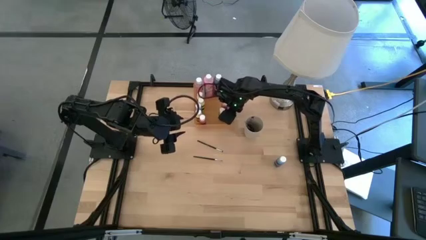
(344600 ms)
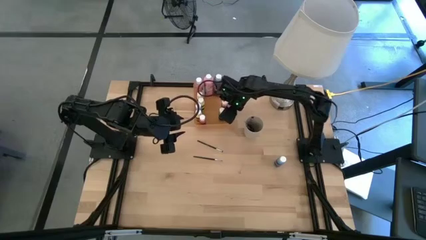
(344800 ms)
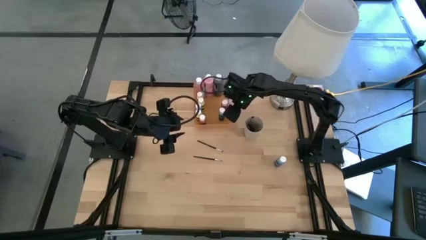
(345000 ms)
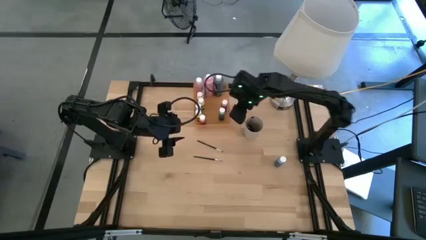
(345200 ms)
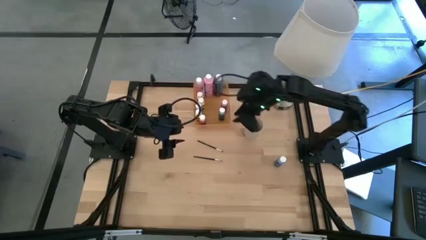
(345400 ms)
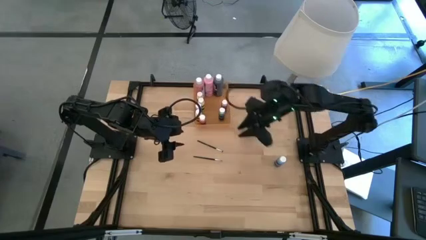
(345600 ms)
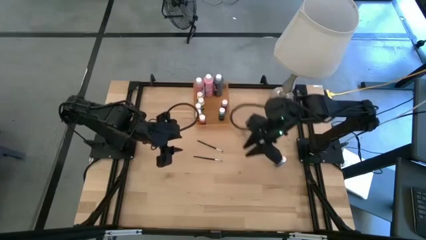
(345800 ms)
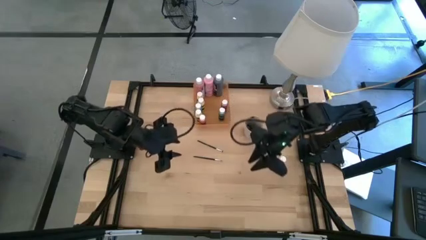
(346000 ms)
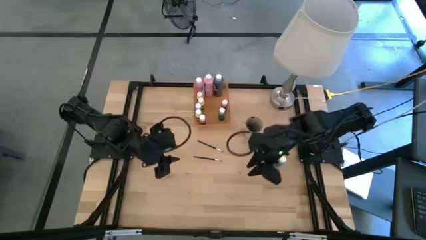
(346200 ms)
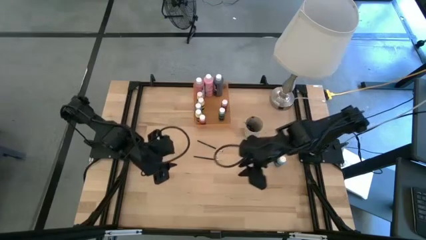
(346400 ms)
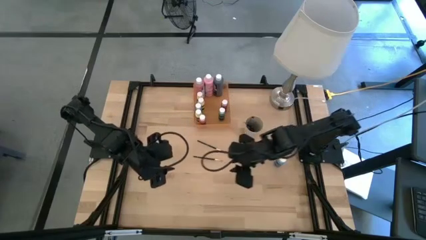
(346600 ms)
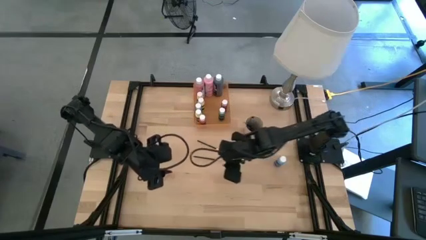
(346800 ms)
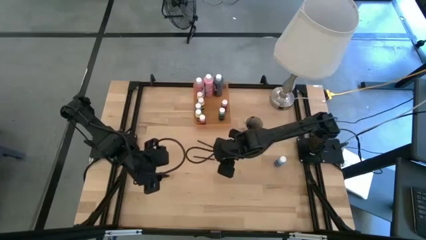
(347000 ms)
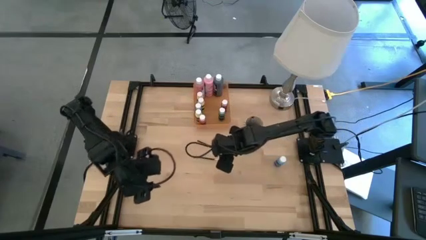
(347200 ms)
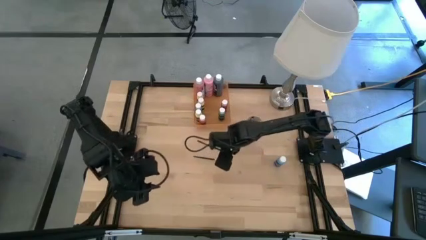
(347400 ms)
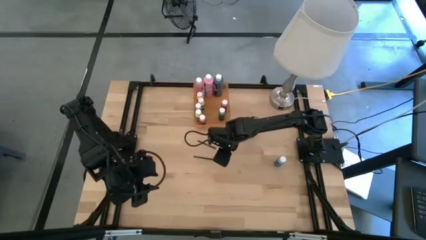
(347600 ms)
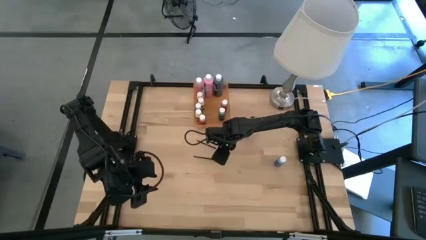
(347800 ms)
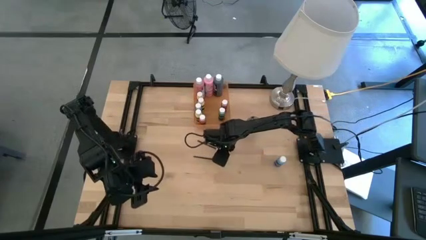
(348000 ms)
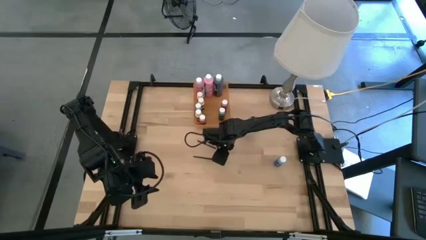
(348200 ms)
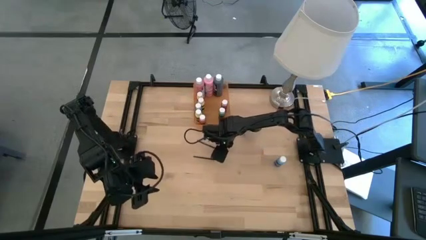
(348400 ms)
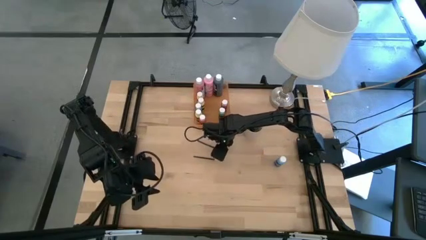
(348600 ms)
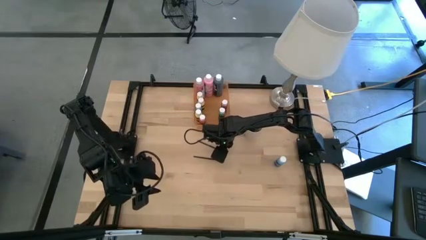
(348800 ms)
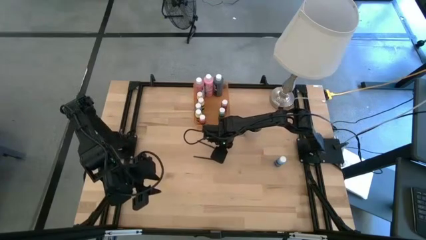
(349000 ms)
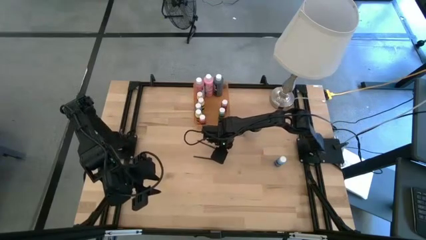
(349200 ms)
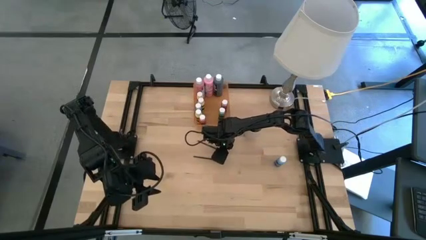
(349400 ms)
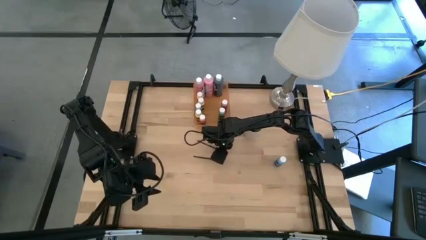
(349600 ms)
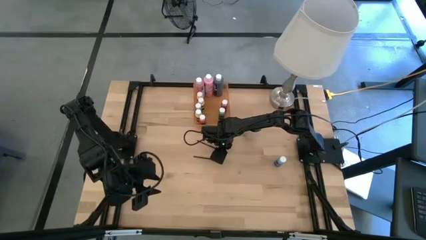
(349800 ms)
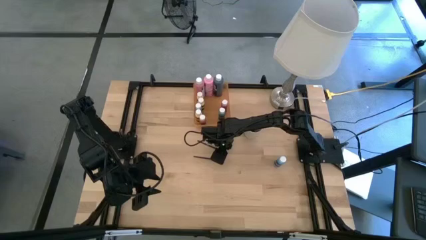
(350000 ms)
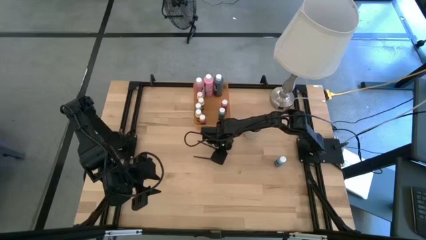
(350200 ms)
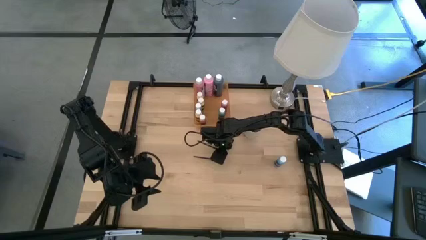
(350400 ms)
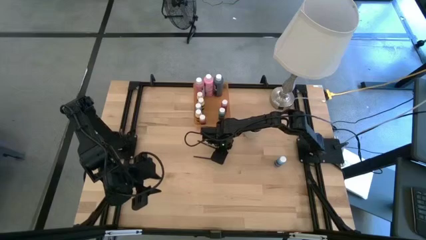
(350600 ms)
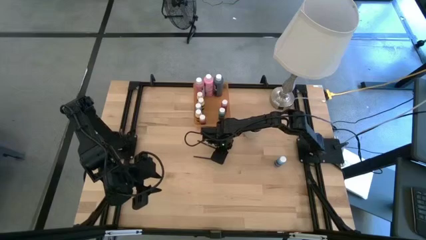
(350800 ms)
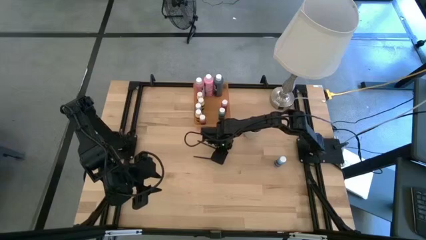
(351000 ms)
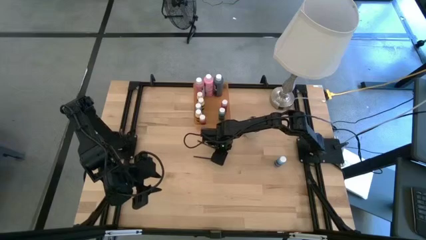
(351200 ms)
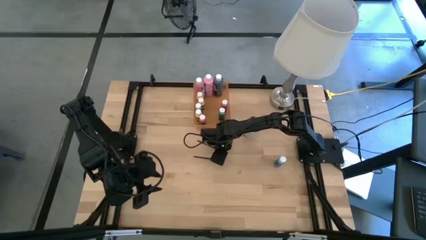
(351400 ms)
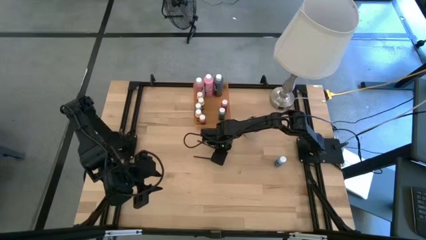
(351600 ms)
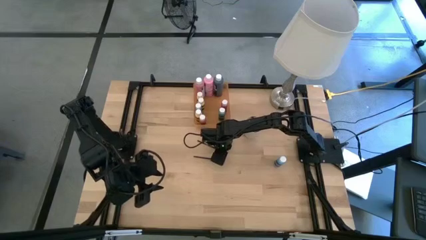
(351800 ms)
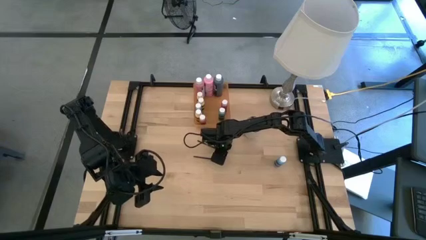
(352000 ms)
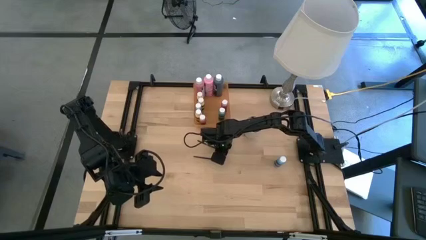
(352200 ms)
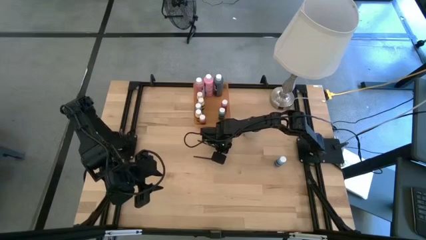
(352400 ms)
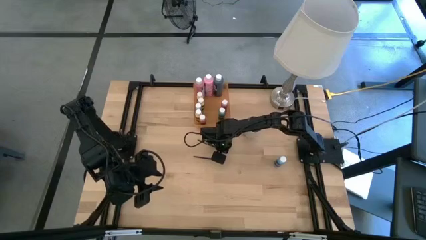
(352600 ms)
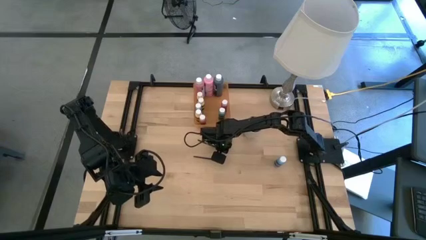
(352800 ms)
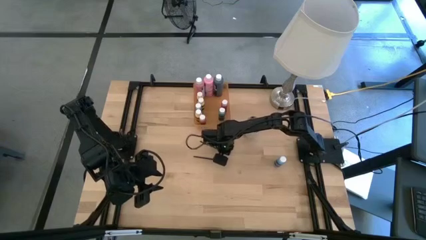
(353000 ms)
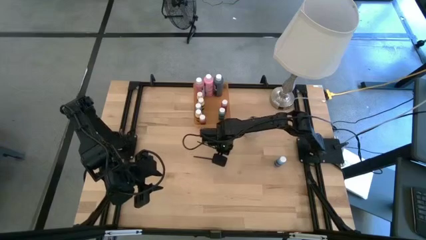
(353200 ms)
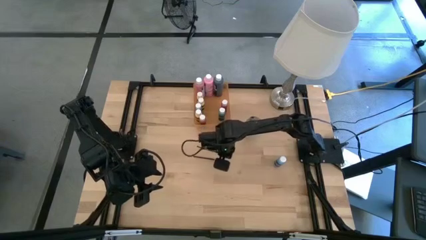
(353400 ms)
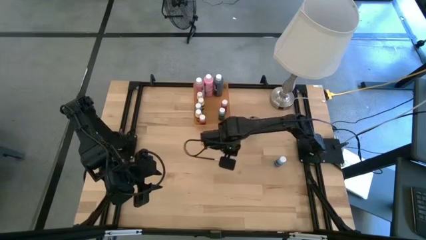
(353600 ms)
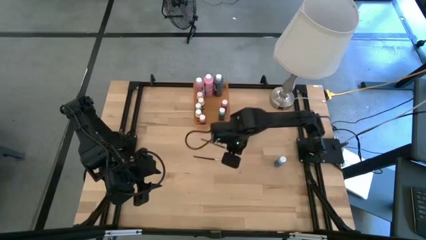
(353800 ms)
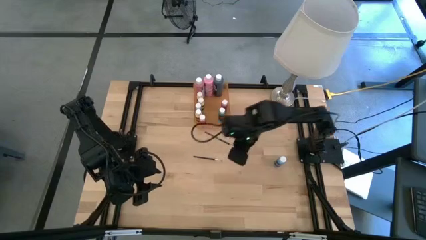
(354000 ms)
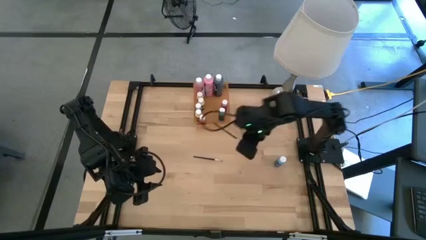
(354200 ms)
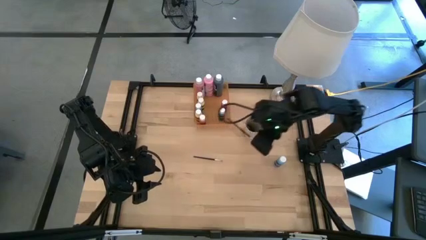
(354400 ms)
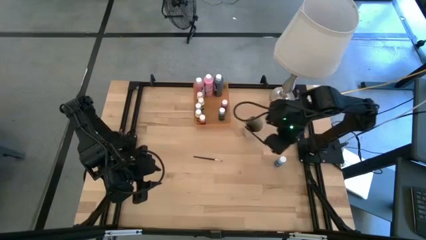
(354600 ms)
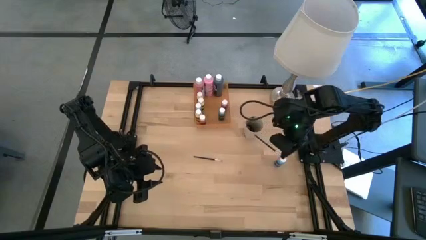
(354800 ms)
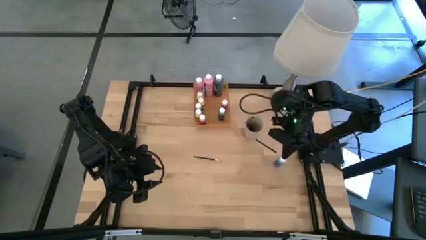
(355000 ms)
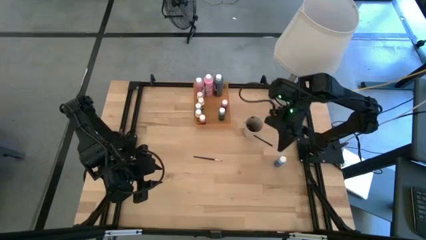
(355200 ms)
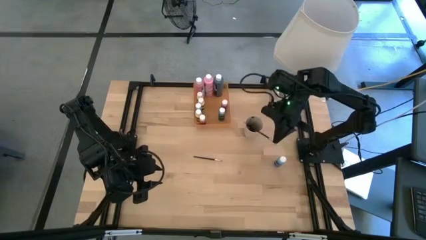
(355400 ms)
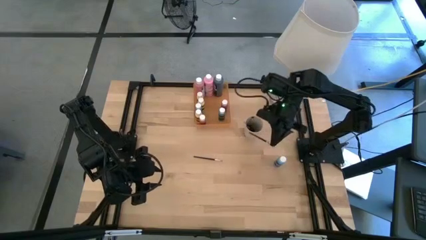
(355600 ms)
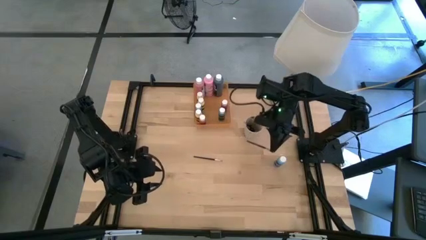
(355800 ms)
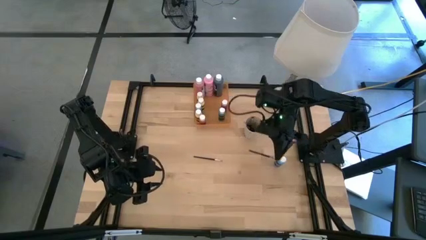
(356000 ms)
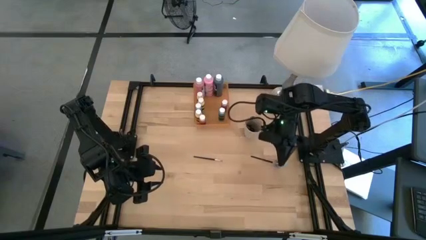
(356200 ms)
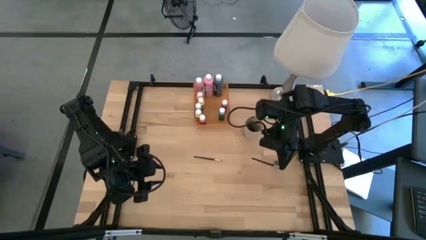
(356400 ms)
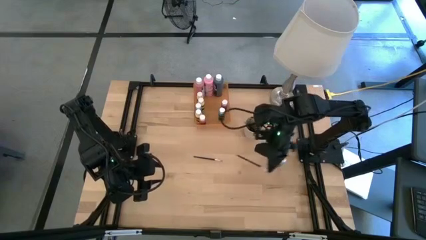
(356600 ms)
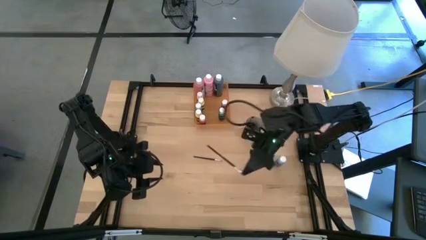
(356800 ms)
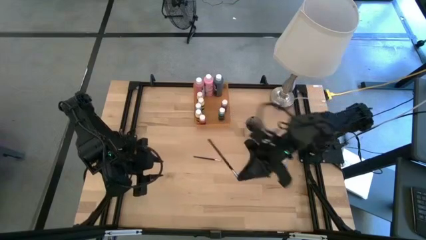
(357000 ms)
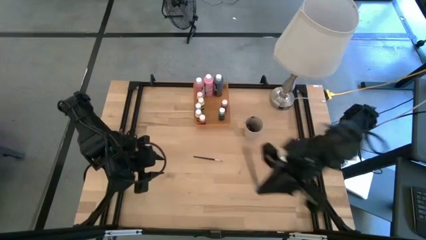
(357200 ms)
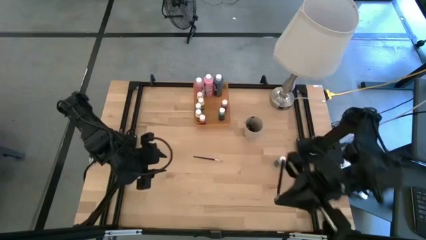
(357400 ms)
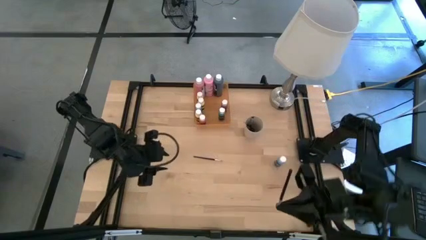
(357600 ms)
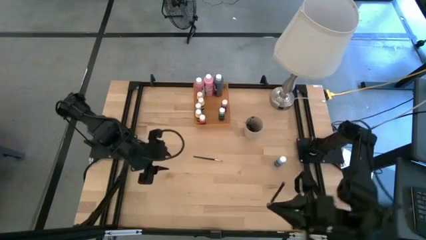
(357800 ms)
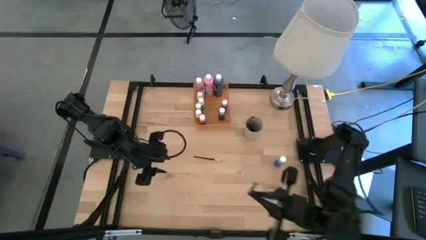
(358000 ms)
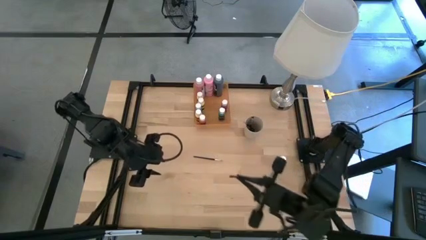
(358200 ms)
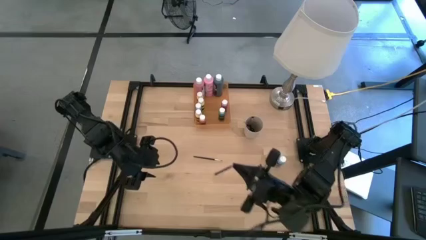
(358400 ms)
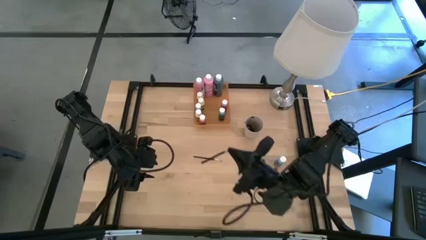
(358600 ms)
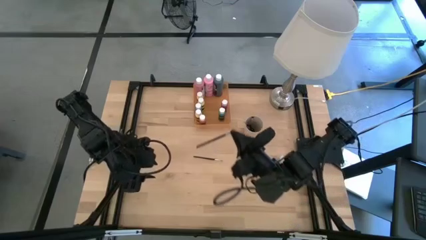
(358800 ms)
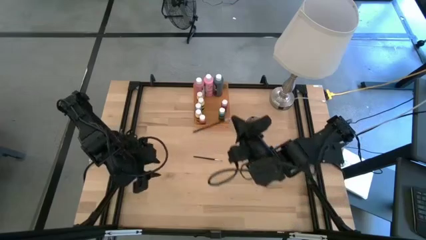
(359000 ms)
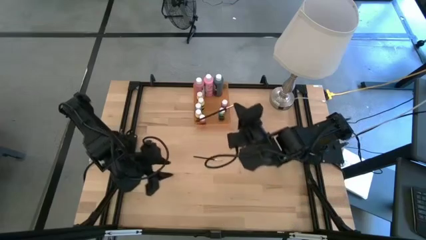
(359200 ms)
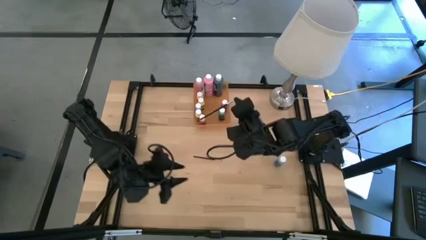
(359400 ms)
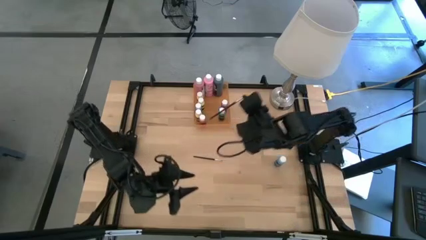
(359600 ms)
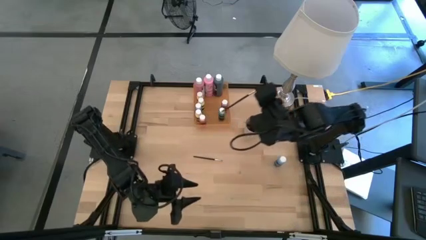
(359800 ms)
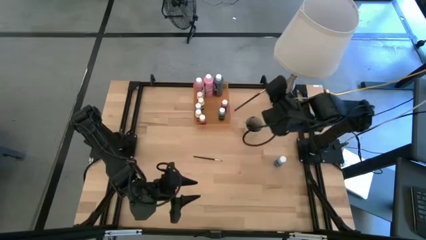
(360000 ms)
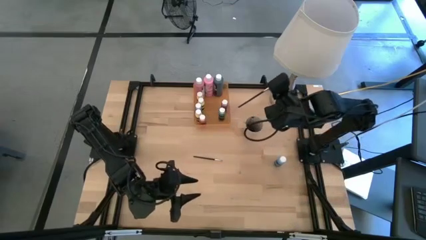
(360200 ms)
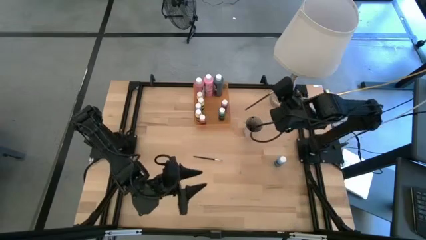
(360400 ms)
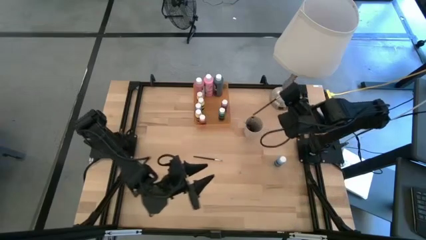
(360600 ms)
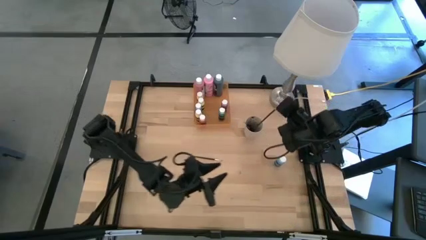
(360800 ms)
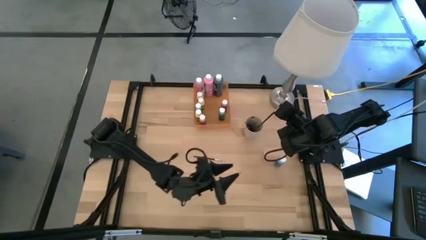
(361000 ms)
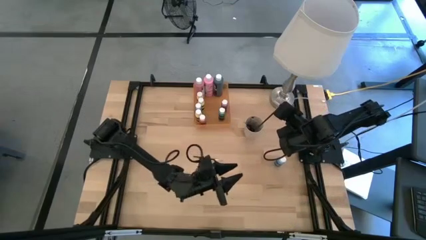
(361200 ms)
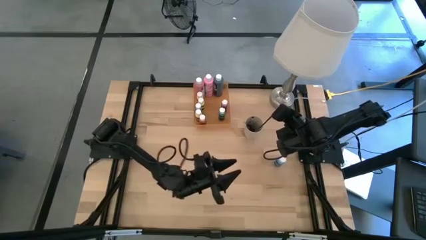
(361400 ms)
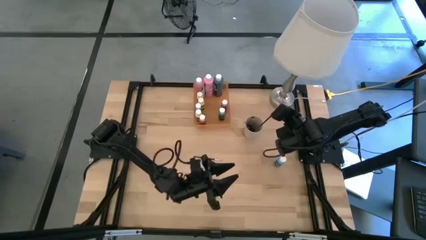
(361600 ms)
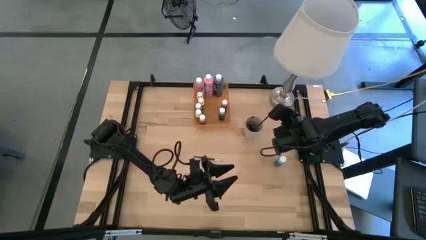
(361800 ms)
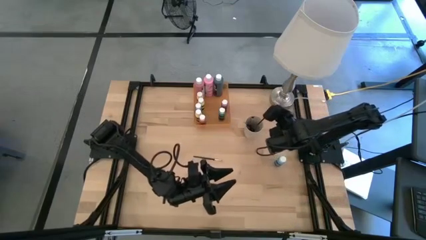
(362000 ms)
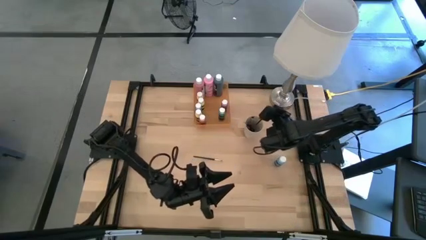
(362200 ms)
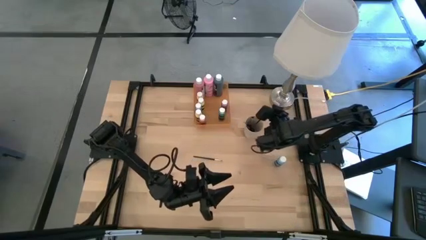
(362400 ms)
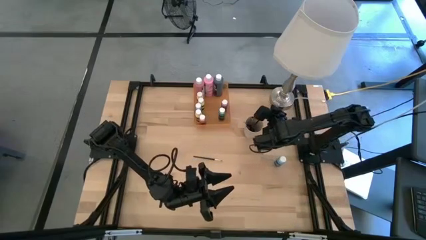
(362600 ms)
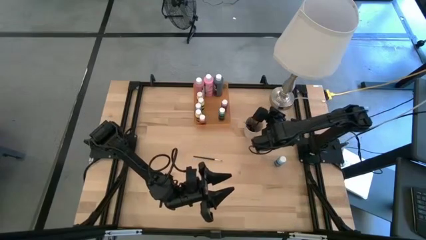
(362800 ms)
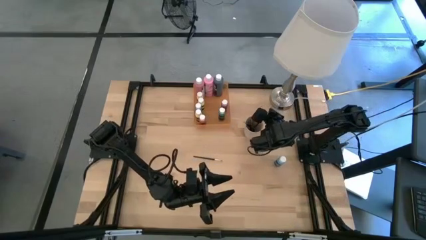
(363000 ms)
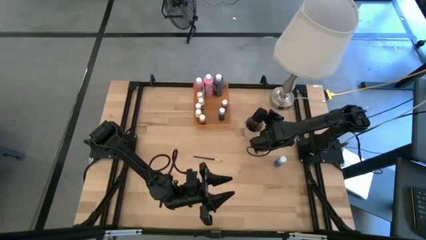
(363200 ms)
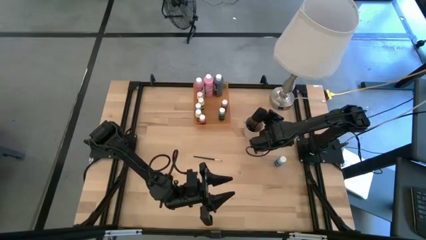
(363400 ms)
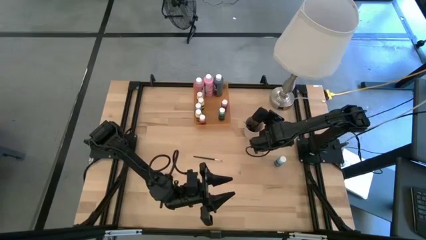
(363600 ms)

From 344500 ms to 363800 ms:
Task: Pick & Place Paint Supplies
Put the black paint brush into the light brown cup
